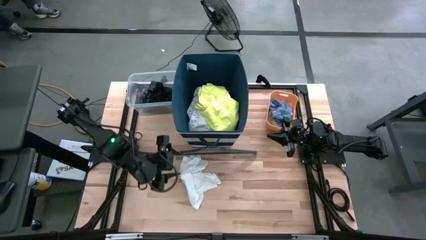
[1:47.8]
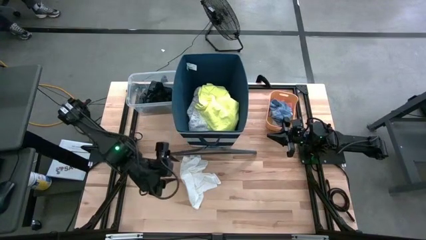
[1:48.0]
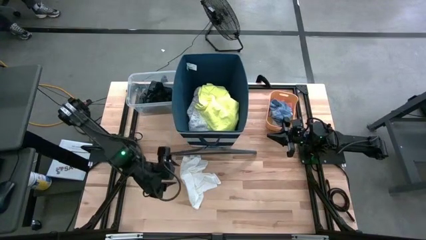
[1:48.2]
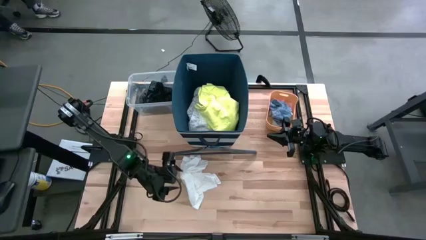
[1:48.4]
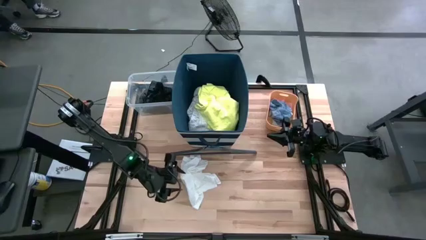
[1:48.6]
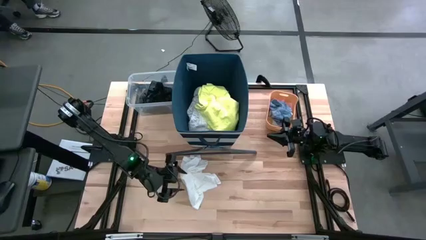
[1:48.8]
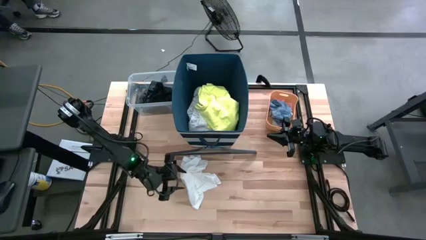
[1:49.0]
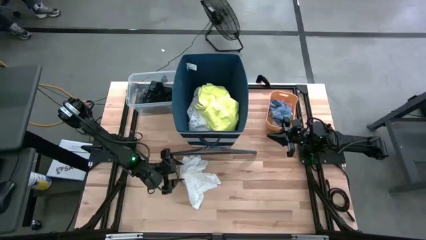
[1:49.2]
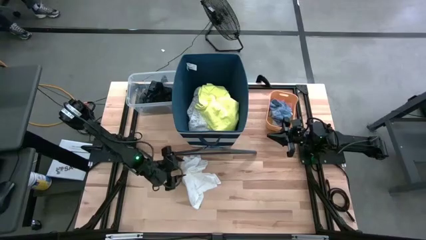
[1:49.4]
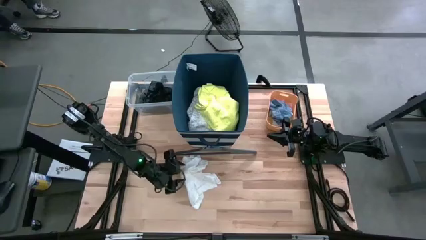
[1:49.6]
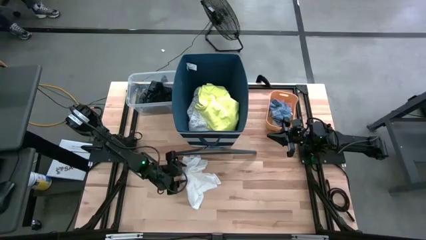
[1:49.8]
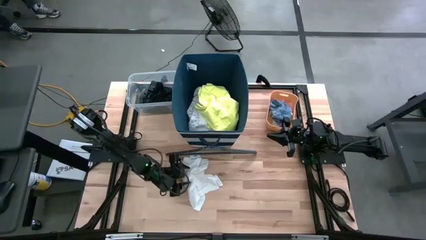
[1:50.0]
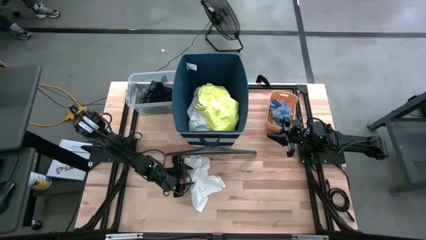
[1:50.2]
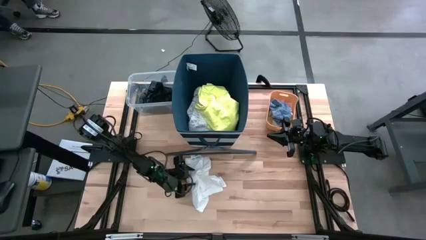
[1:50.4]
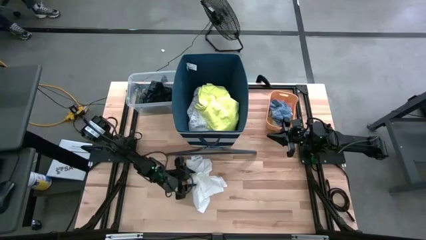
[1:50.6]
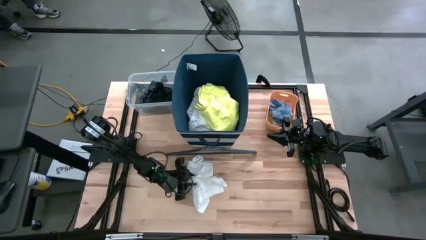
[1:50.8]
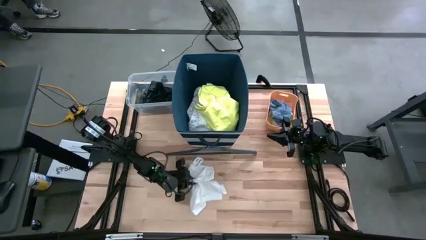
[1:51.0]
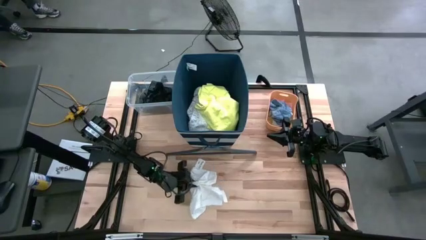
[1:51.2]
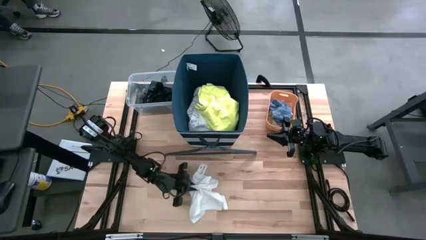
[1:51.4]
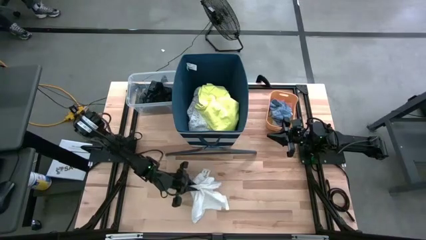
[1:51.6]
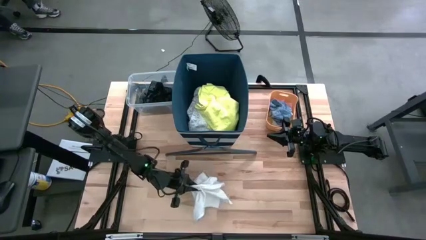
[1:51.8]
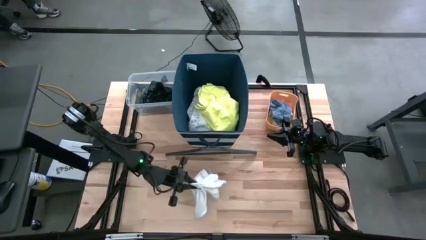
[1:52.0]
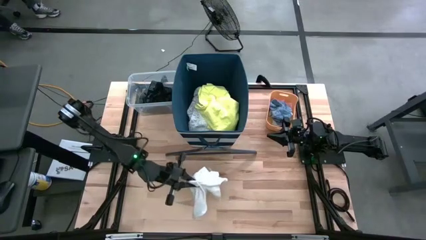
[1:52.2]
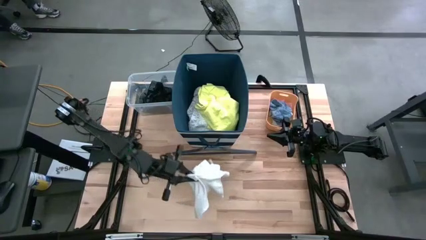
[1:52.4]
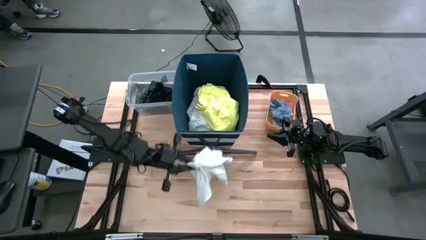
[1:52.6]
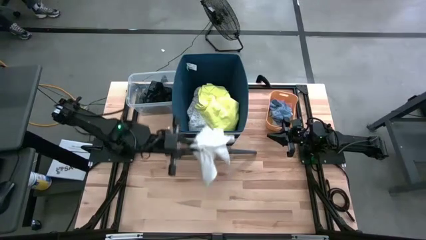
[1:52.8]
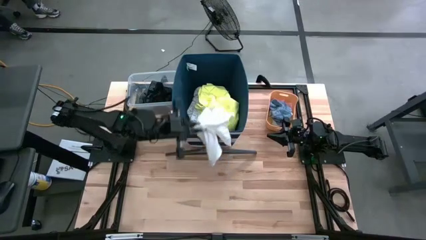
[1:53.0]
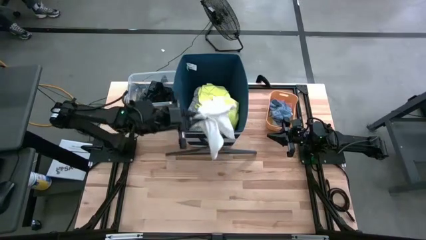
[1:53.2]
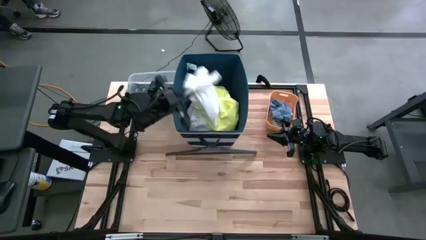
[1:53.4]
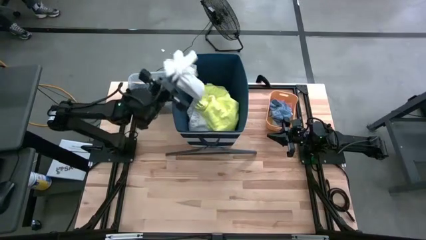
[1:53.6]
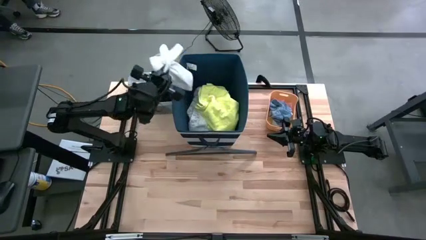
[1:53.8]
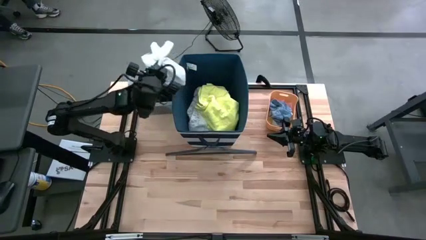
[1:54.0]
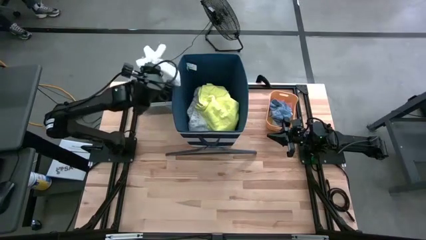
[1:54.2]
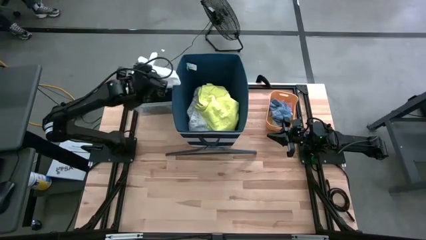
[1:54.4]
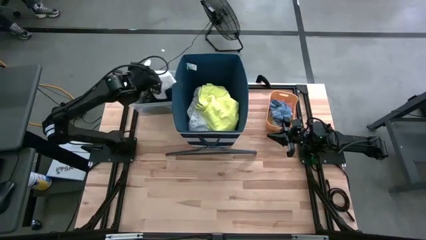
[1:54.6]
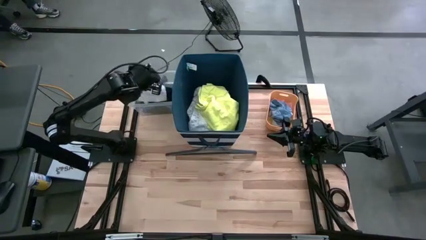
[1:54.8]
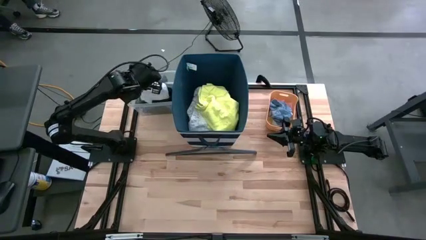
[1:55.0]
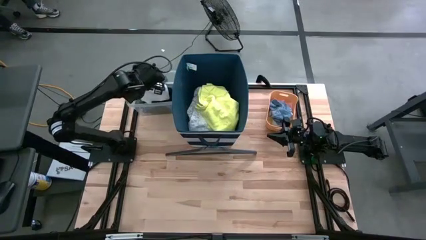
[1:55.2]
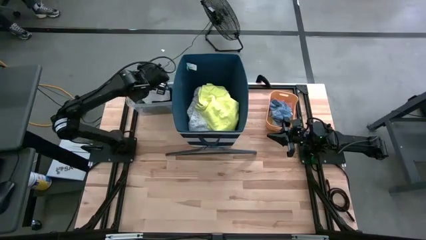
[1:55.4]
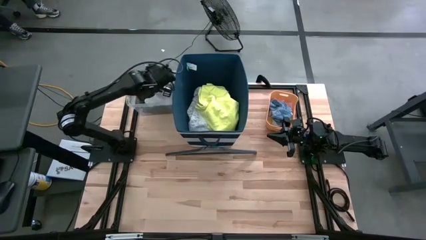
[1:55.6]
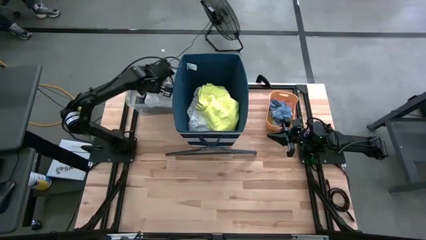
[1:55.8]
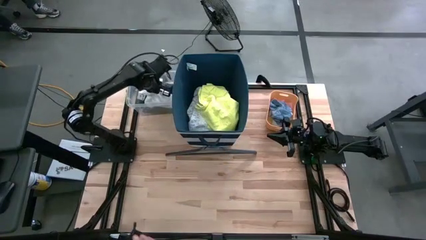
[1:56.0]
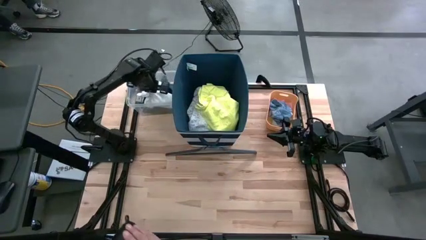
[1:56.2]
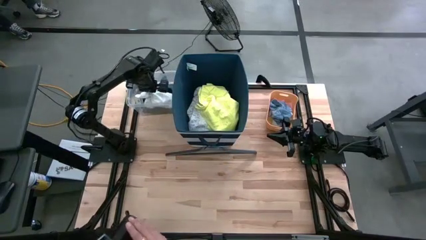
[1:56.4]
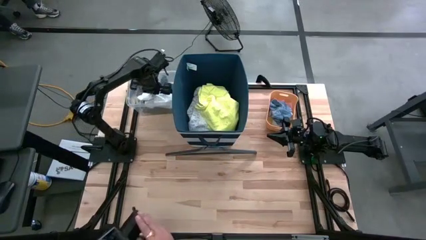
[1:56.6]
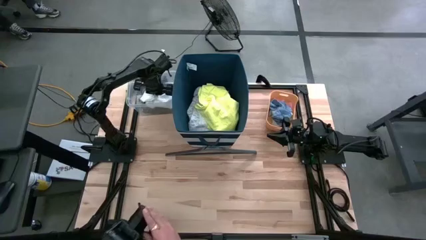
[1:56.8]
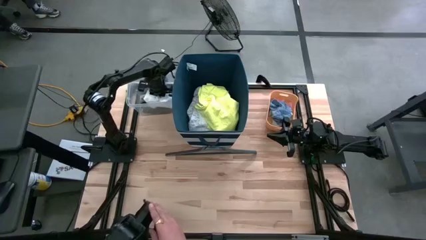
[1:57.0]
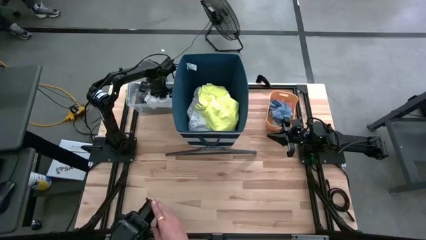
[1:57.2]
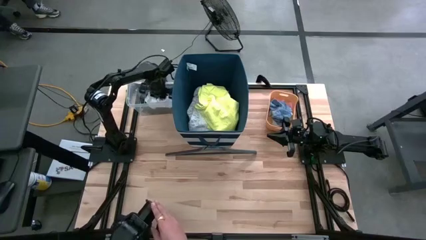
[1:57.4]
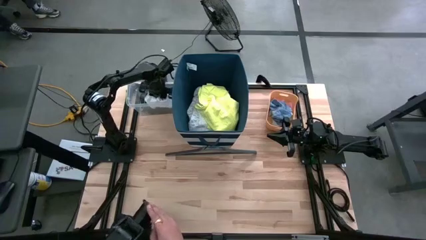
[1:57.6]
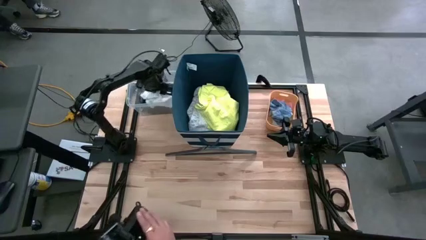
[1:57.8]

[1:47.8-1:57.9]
Task: Pick & Place Cloths
Put the white boxer into the transparent container

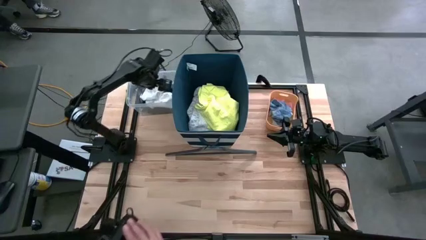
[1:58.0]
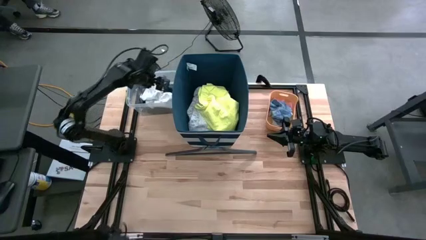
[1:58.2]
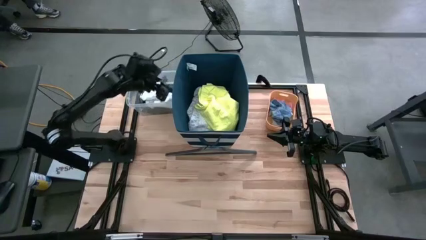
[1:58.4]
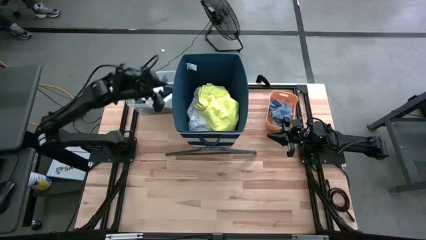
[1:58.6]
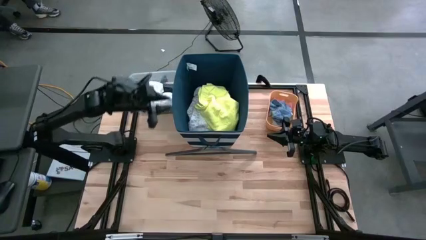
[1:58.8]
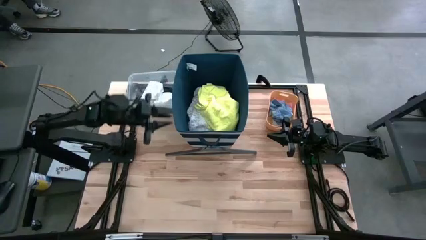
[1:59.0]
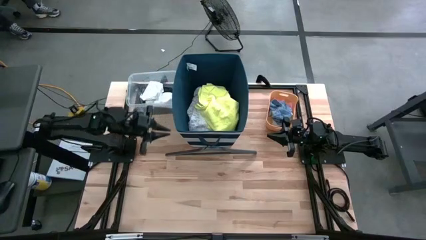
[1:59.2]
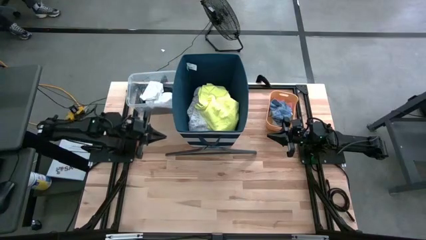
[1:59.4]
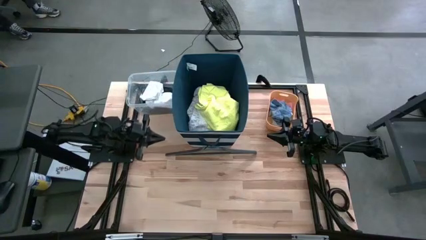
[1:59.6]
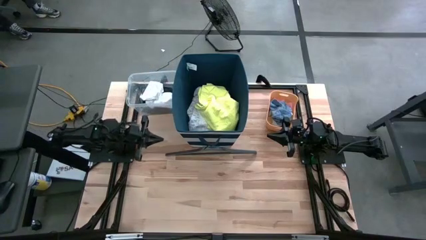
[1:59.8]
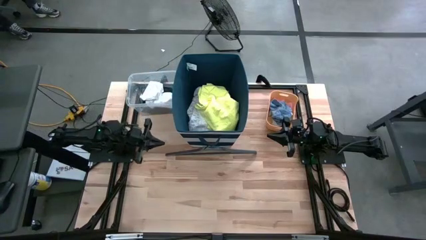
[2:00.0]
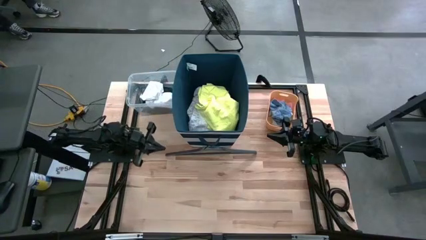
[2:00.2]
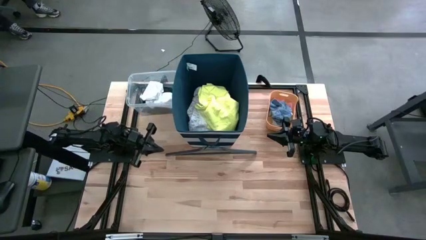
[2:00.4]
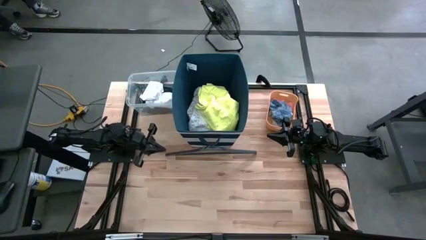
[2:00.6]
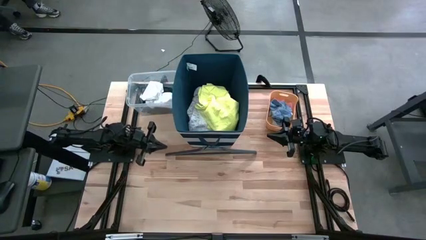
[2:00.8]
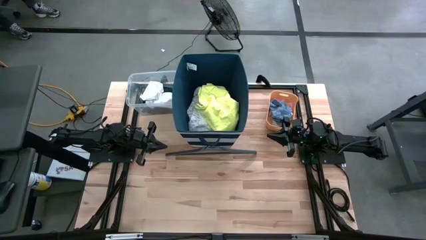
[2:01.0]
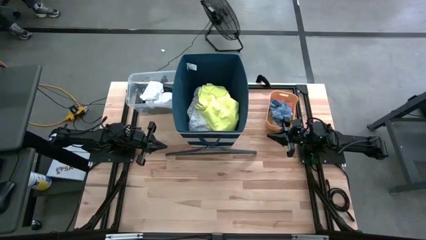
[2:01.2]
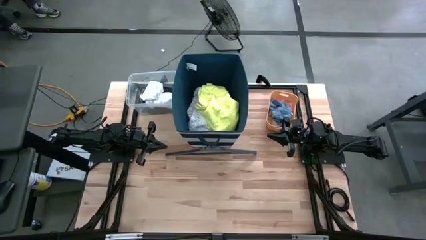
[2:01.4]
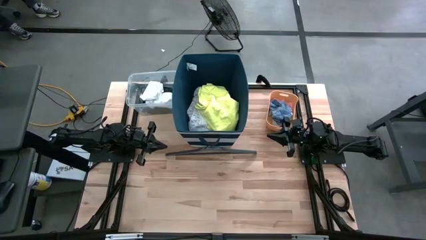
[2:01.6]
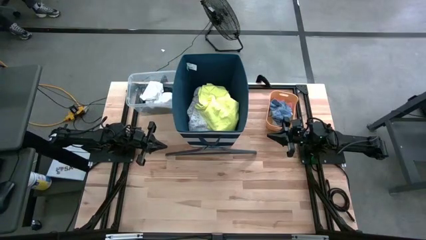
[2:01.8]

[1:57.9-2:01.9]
Return to Home Position

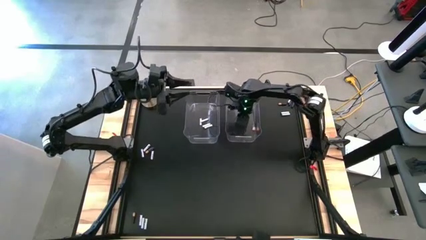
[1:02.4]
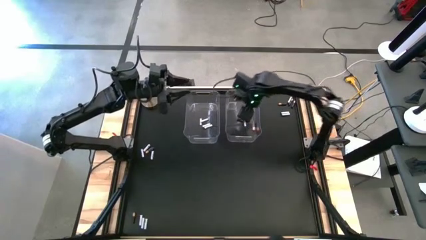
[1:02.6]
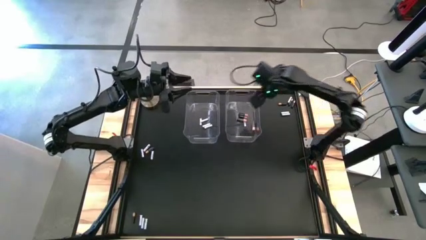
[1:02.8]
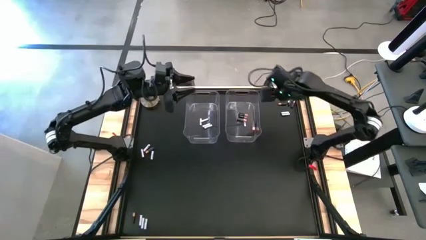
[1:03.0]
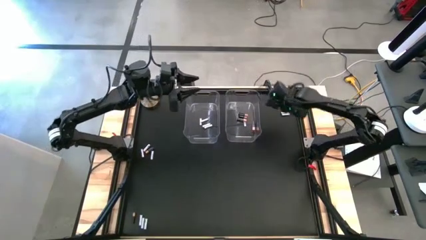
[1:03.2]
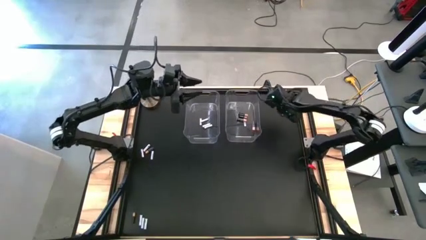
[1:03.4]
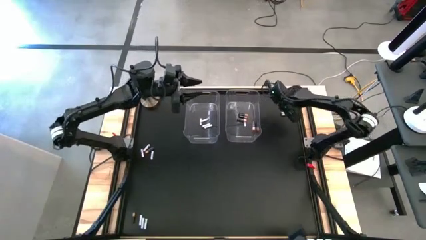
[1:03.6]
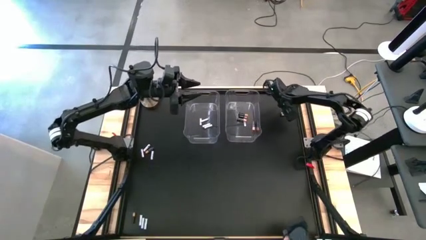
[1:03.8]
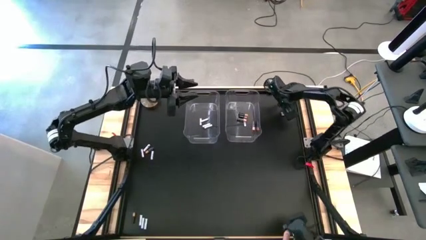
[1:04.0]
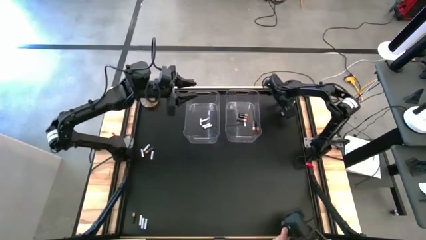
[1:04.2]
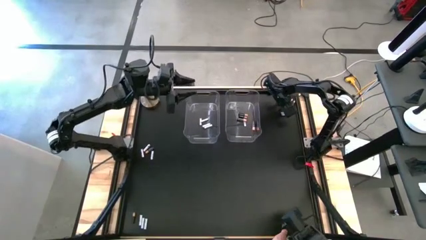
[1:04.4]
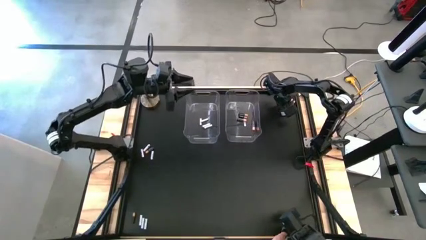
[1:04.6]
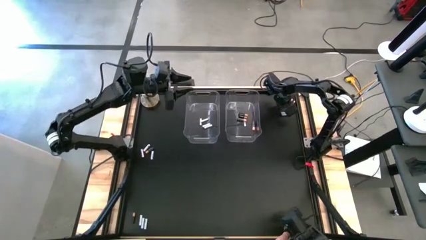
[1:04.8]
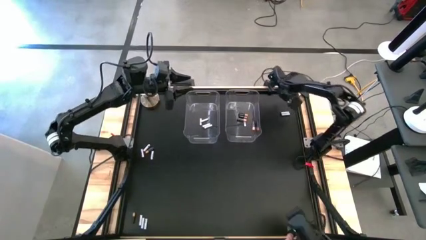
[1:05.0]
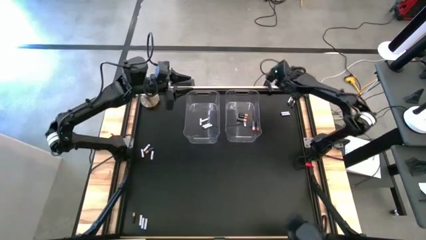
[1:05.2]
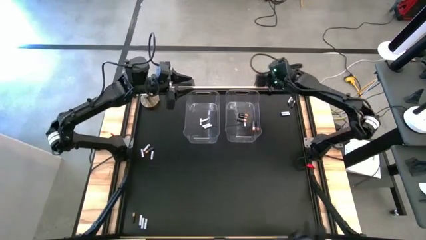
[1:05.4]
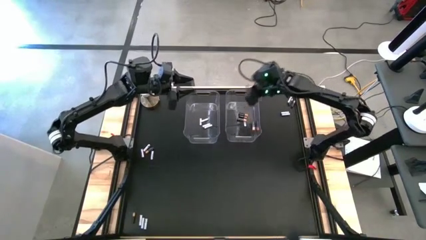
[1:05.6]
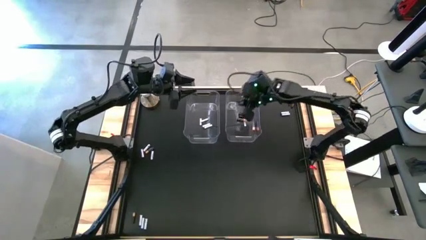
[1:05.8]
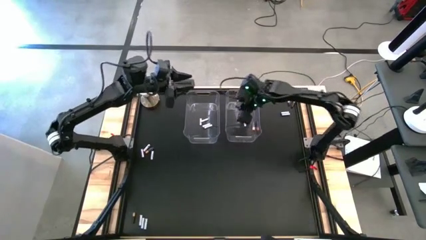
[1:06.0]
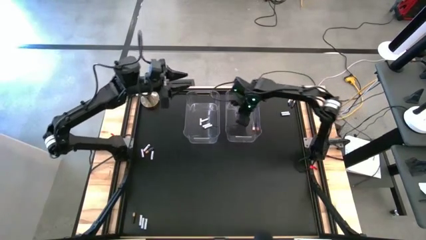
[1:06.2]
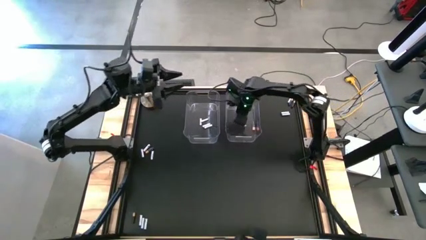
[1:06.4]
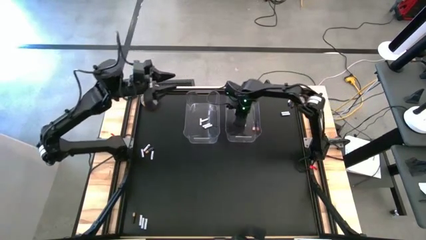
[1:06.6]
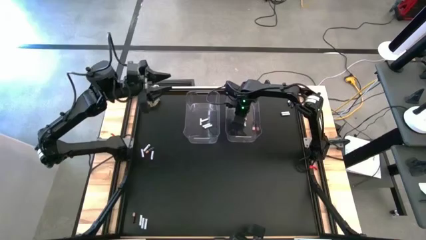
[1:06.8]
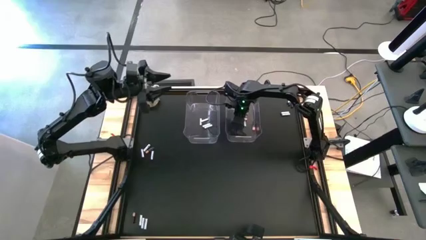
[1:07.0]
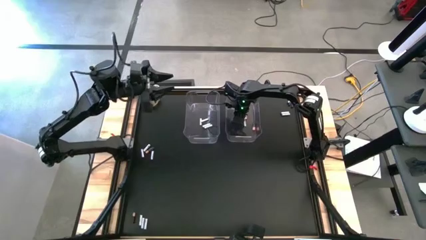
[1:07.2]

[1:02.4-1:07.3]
Task: Sort batteries
Put the brown battery into the right transparent bin
